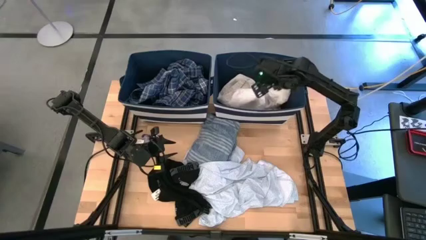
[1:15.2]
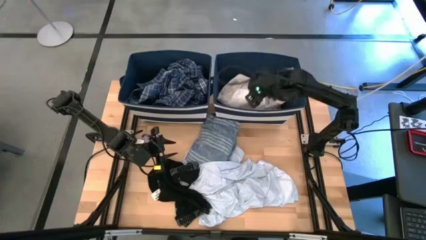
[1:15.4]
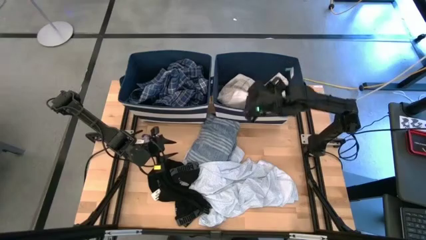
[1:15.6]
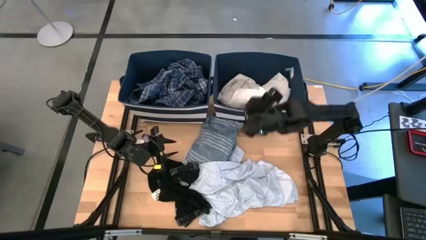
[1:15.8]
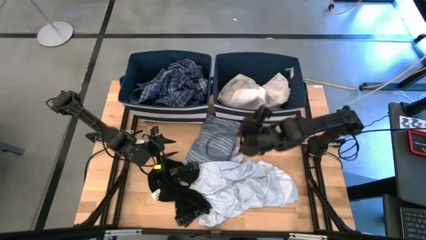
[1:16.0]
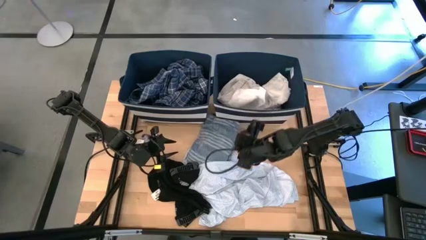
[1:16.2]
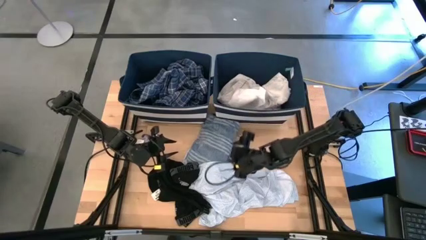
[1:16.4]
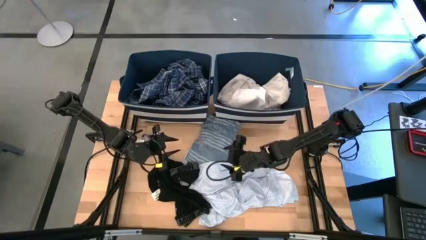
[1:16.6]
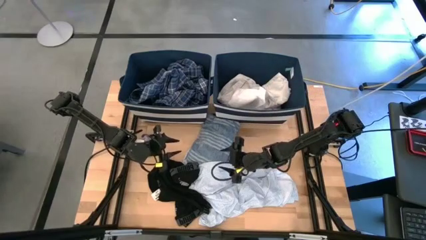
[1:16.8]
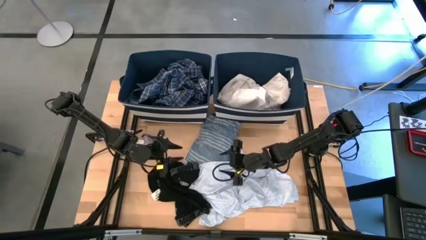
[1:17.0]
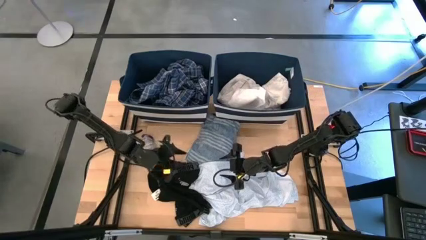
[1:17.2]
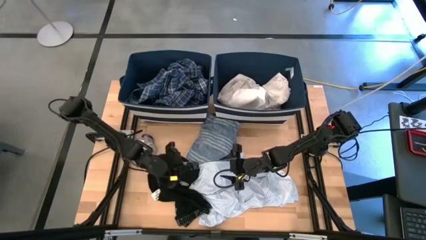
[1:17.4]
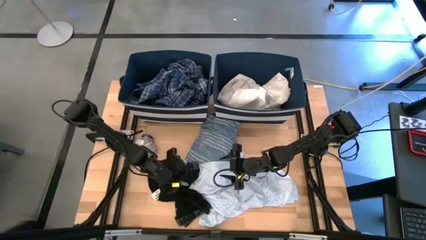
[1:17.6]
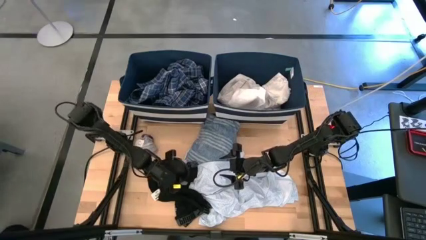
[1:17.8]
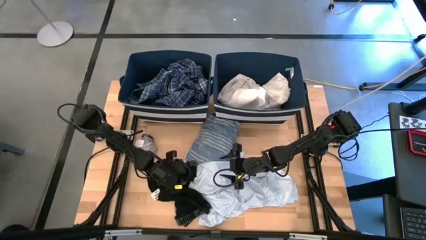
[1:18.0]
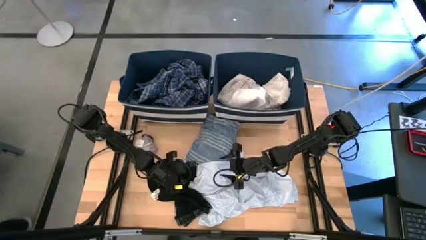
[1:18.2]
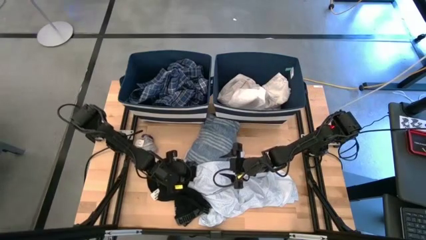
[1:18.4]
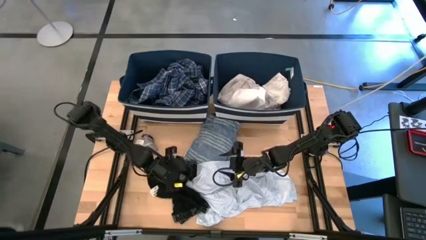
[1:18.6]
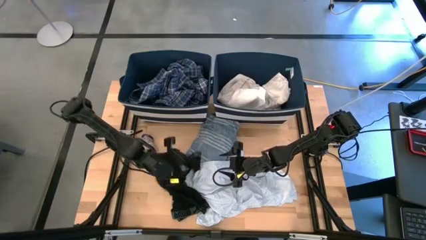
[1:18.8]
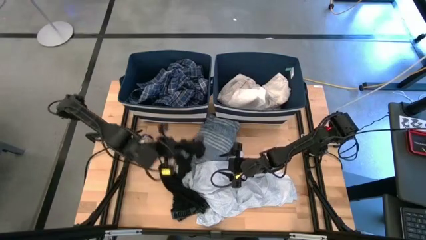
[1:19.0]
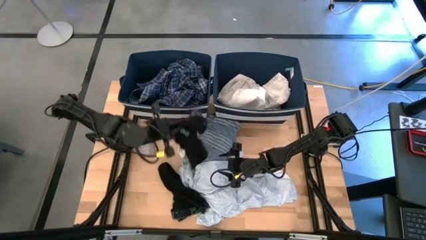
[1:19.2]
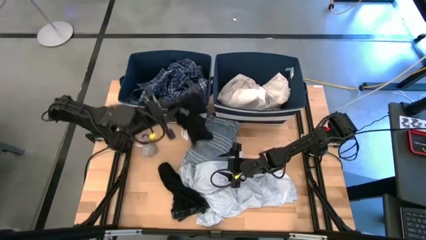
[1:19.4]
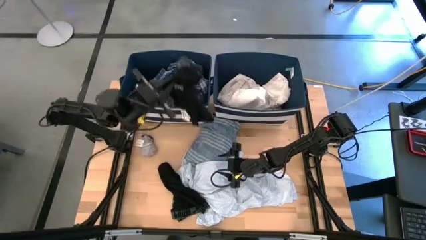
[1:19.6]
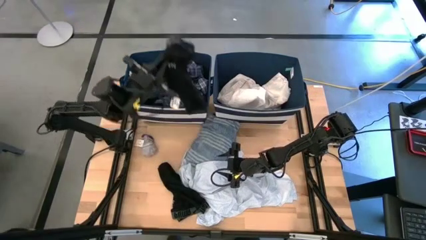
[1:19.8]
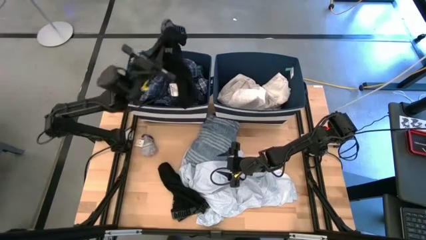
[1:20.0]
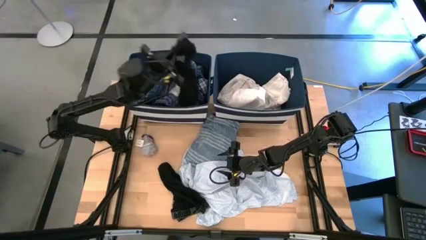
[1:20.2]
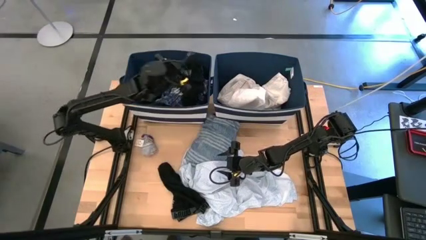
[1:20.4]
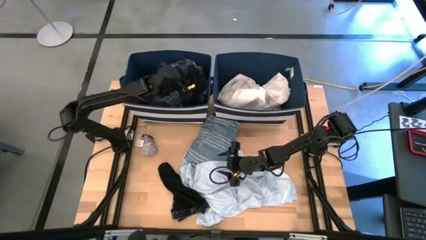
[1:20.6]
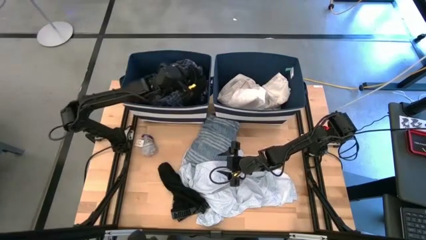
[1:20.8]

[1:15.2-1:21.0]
Task: Sort clothes
Put the black underwear into the left blue laundry bin

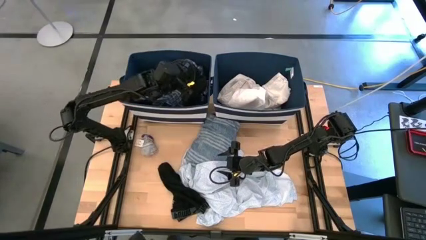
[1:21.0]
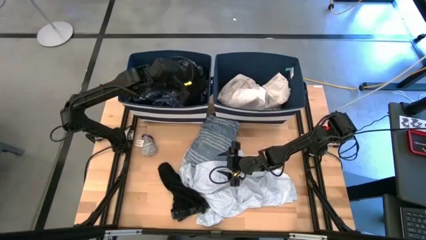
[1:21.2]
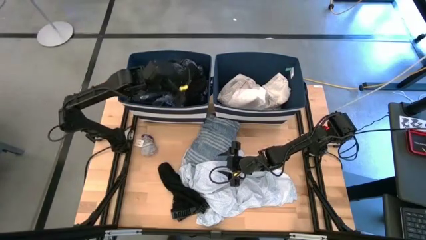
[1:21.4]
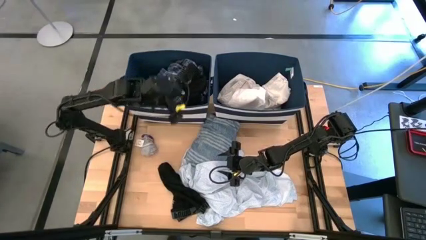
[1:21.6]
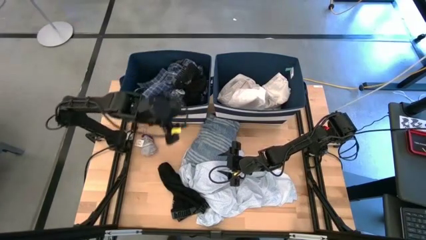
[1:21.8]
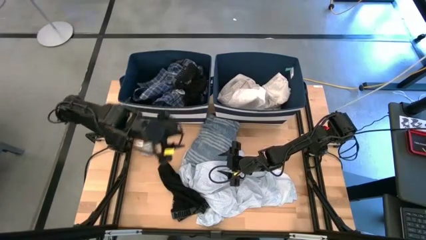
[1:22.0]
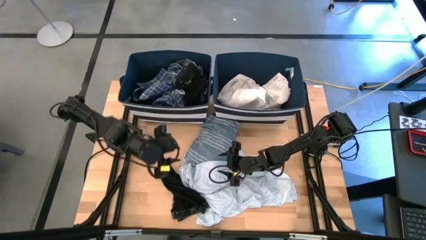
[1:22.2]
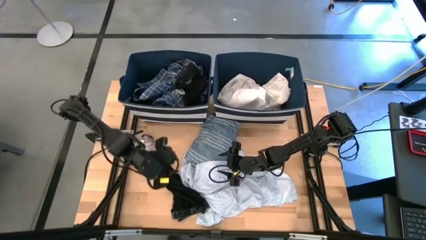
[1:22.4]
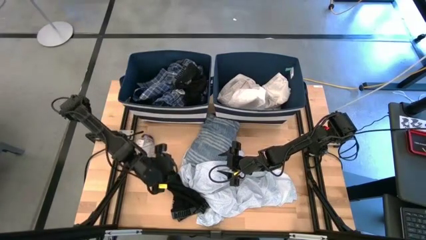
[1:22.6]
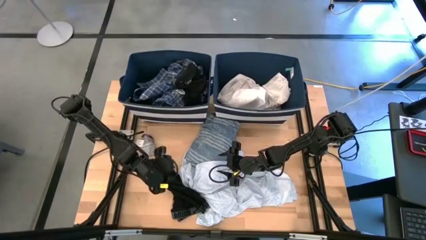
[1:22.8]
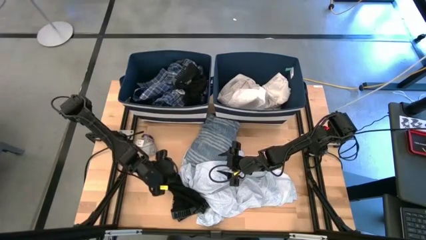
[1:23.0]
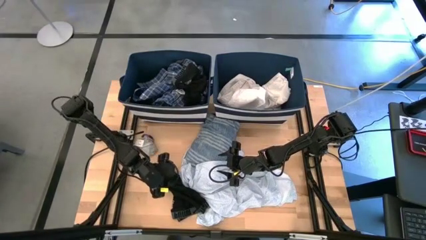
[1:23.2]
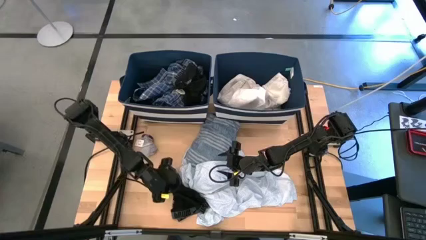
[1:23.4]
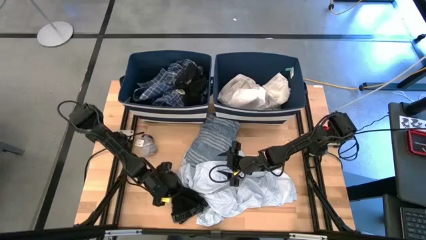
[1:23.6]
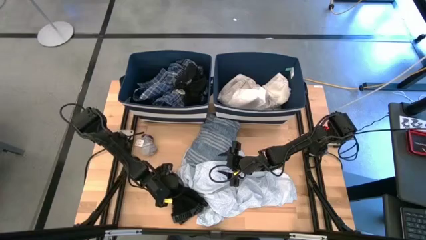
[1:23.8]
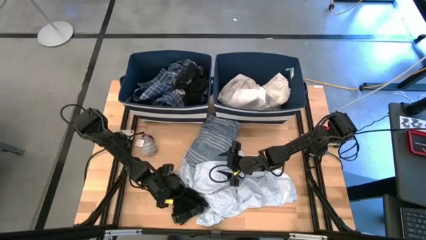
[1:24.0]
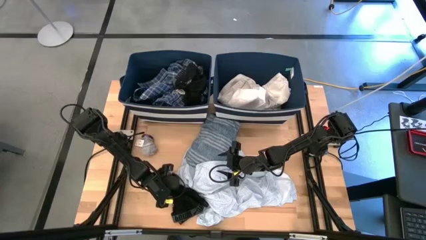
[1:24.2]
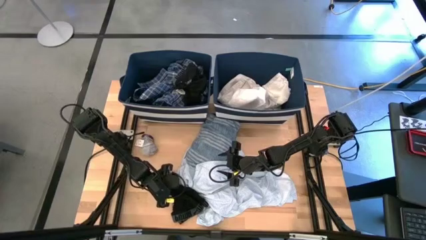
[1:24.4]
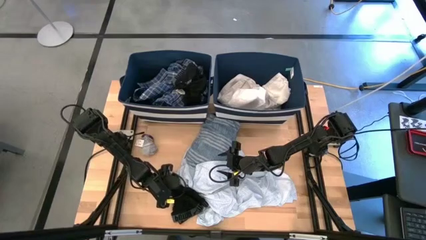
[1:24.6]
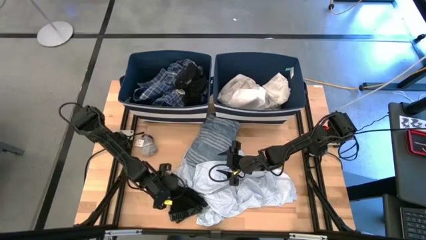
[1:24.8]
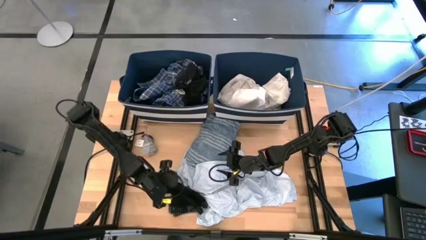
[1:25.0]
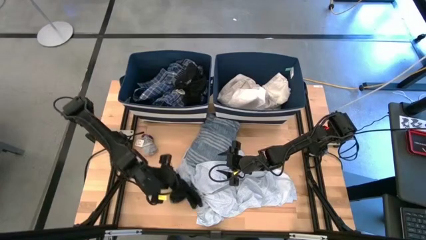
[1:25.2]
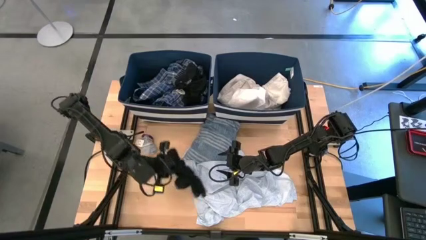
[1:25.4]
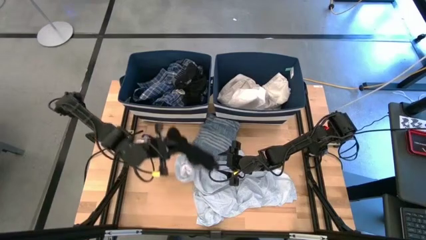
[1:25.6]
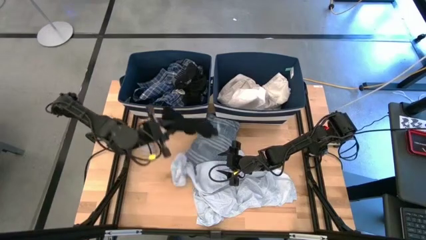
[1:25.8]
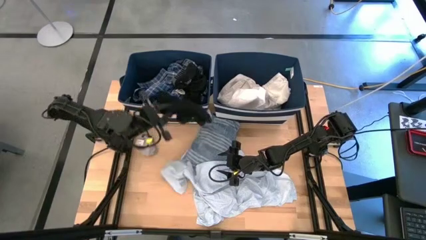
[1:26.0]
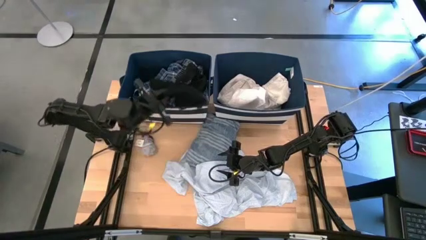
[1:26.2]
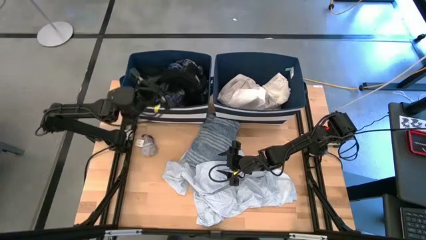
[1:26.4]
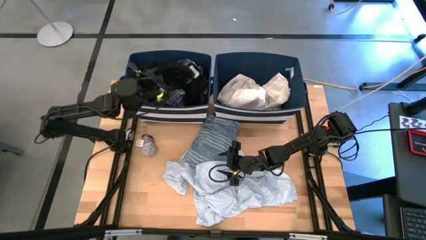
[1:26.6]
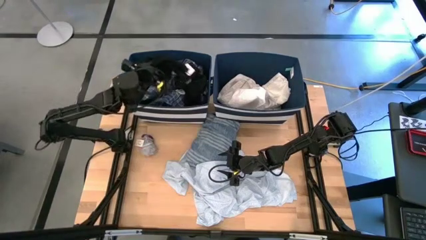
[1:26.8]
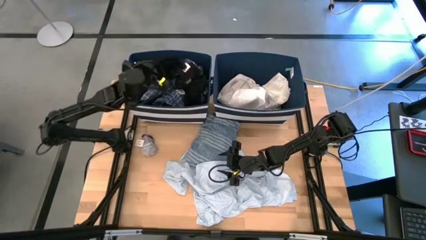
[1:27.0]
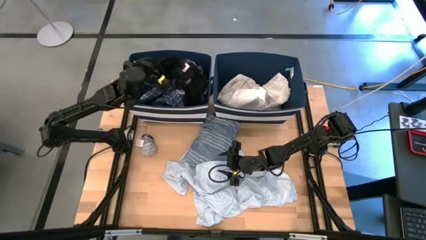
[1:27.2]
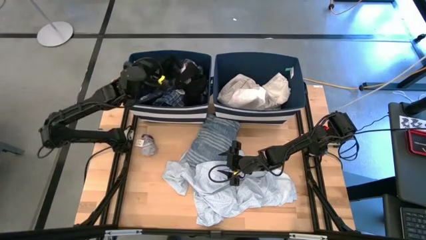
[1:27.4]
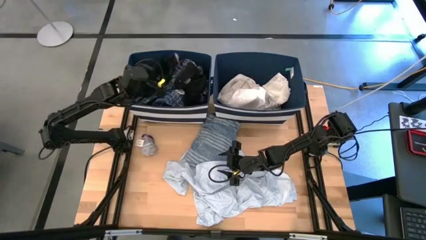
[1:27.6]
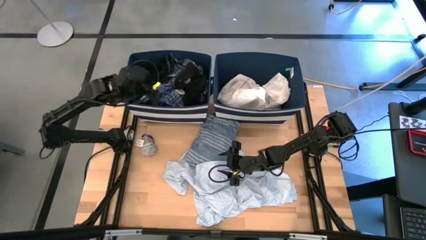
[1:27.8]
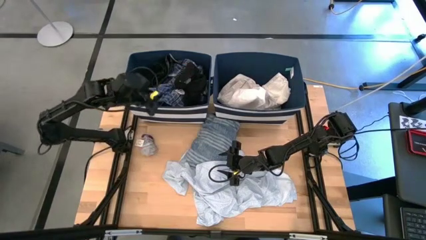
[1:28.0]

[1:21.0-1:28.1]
Put the black underwear into the left blue laundry bin
